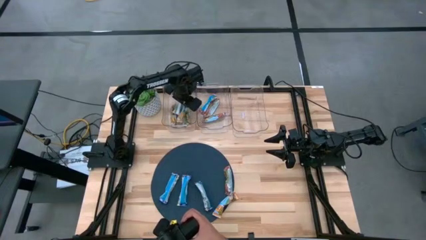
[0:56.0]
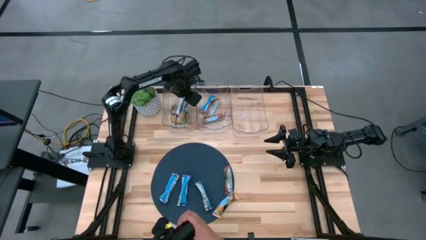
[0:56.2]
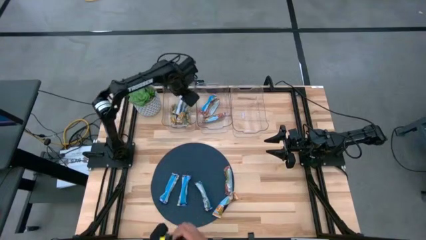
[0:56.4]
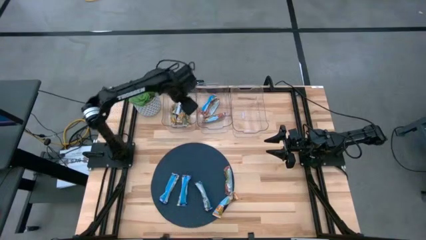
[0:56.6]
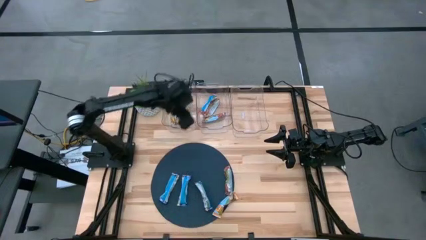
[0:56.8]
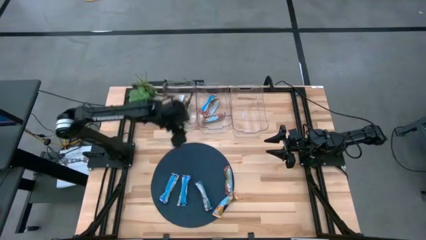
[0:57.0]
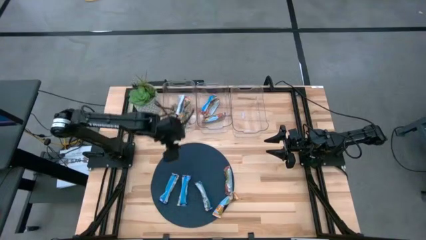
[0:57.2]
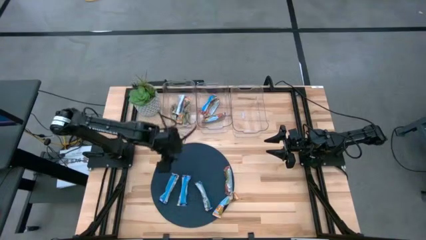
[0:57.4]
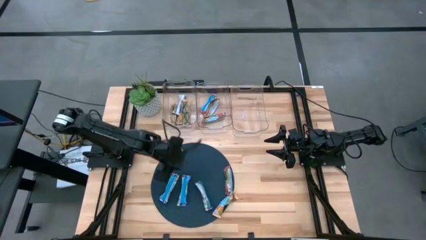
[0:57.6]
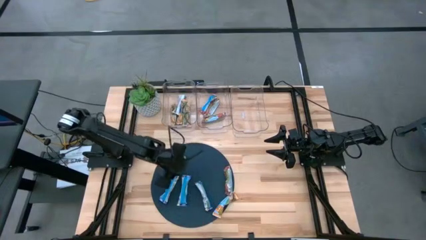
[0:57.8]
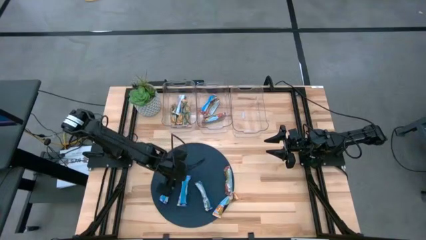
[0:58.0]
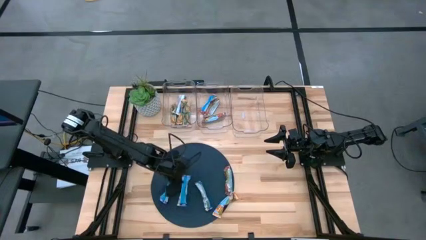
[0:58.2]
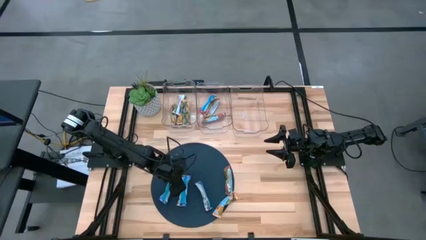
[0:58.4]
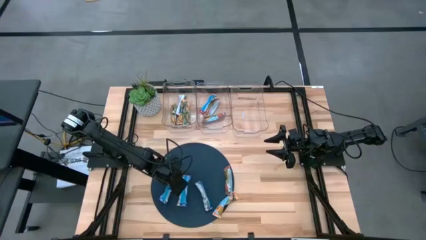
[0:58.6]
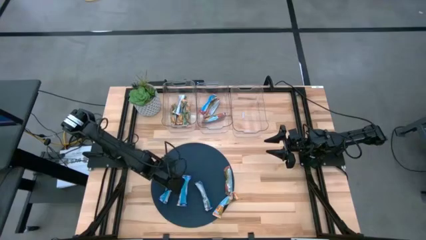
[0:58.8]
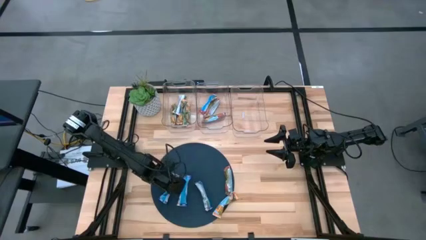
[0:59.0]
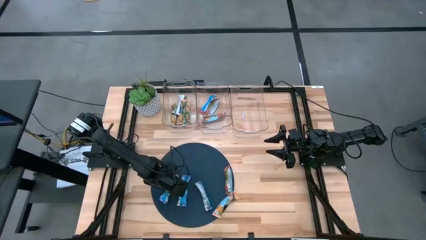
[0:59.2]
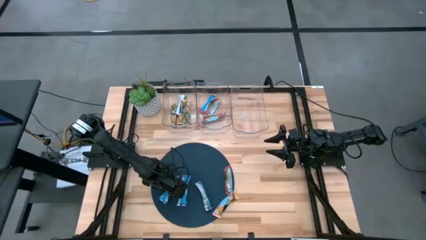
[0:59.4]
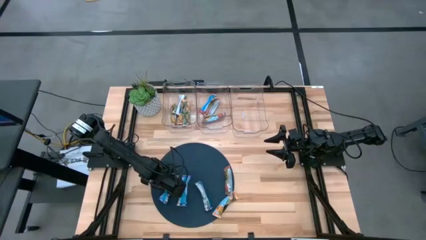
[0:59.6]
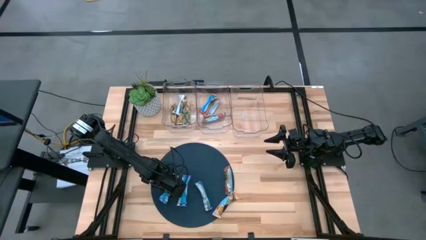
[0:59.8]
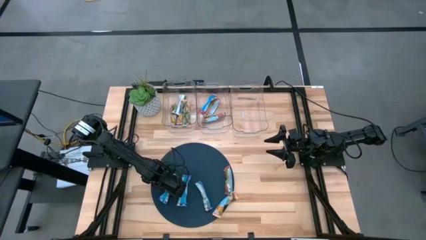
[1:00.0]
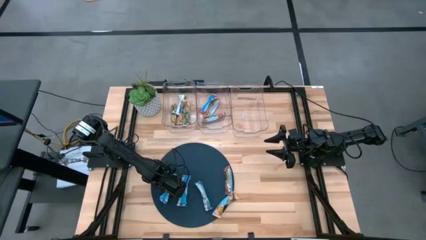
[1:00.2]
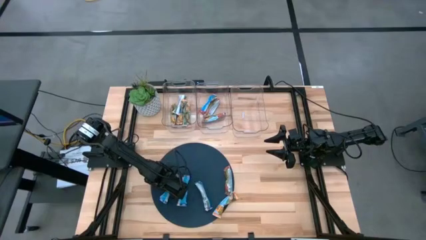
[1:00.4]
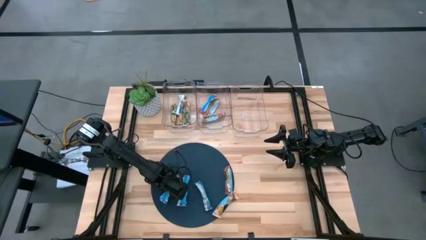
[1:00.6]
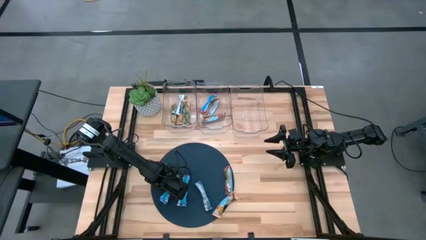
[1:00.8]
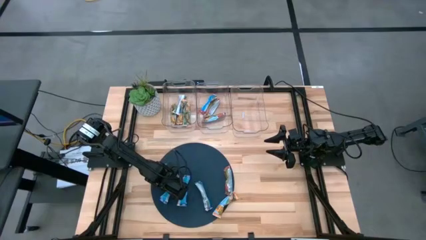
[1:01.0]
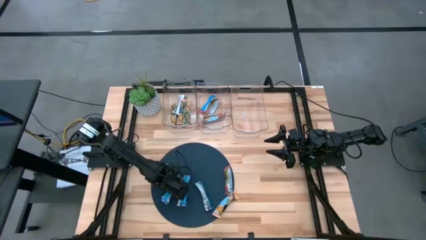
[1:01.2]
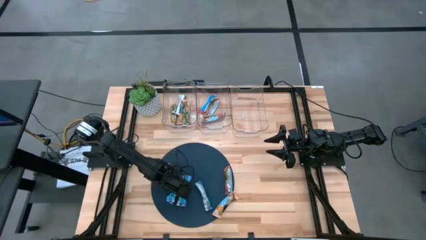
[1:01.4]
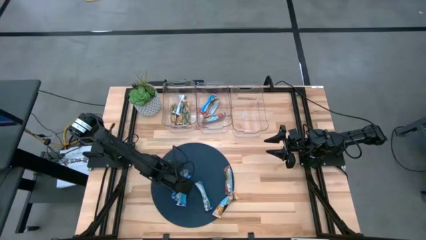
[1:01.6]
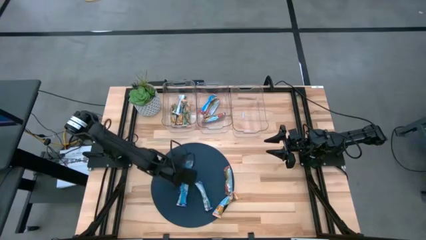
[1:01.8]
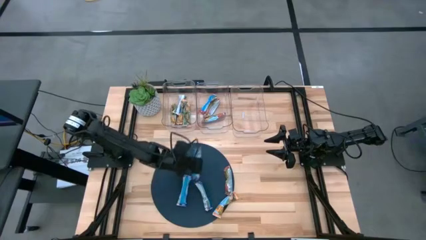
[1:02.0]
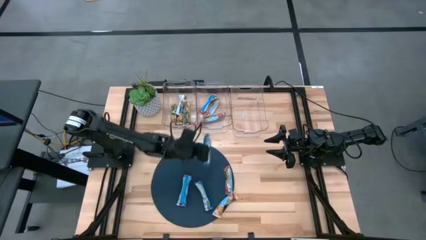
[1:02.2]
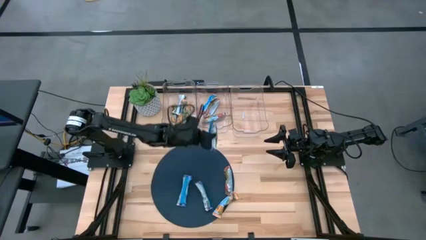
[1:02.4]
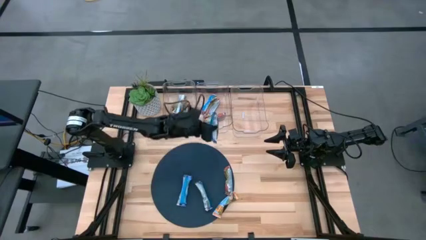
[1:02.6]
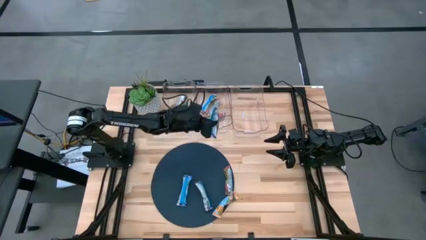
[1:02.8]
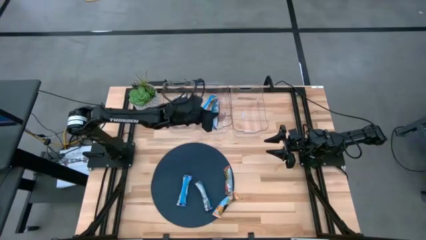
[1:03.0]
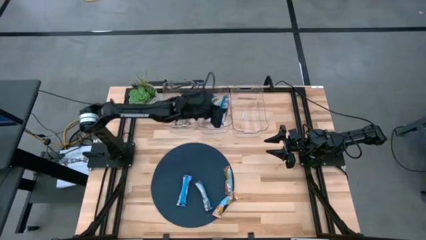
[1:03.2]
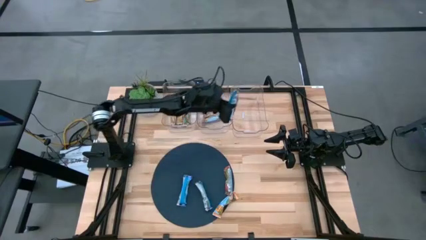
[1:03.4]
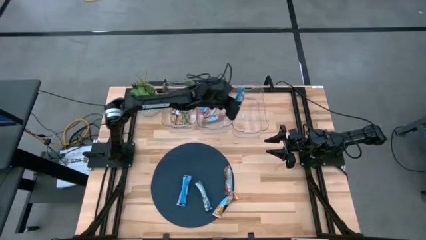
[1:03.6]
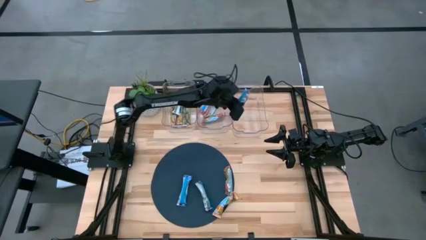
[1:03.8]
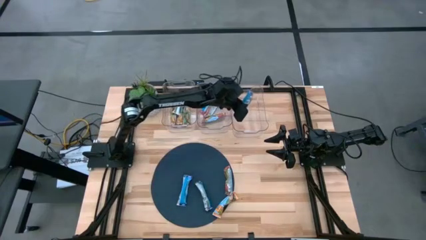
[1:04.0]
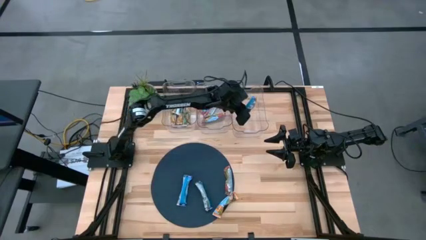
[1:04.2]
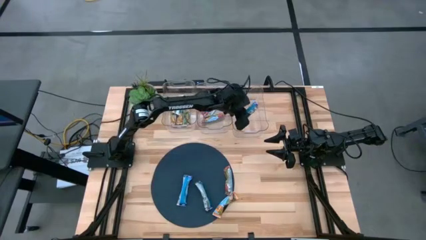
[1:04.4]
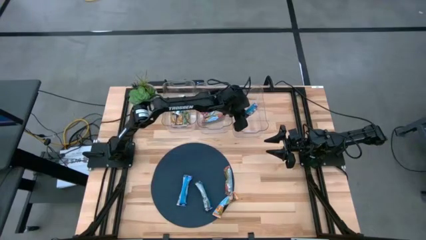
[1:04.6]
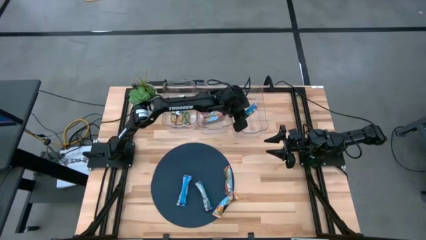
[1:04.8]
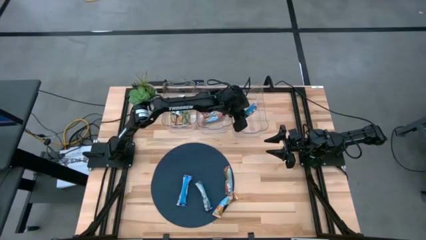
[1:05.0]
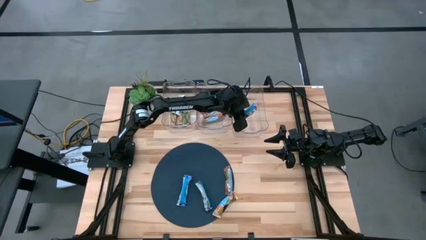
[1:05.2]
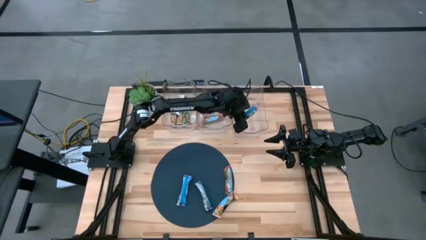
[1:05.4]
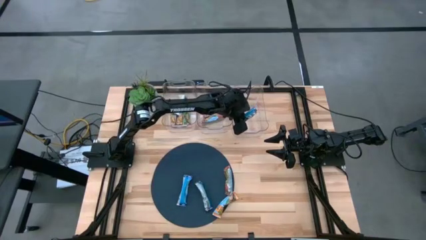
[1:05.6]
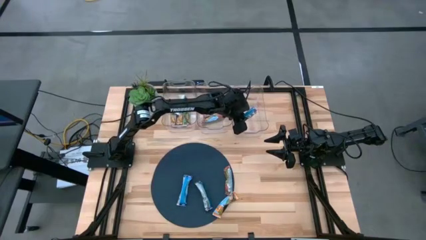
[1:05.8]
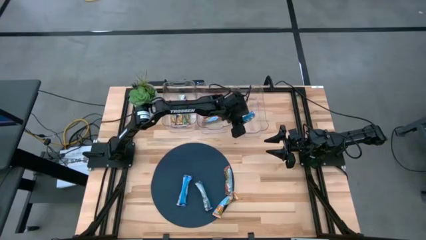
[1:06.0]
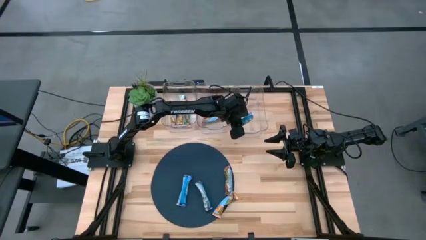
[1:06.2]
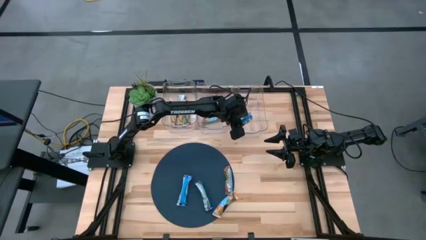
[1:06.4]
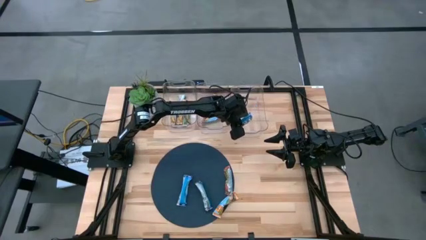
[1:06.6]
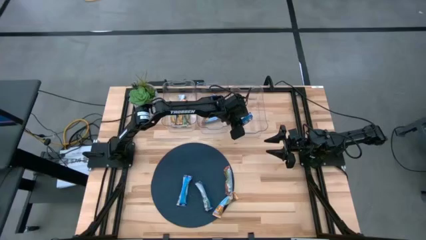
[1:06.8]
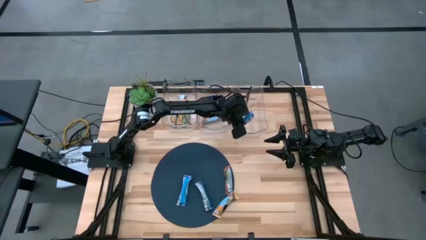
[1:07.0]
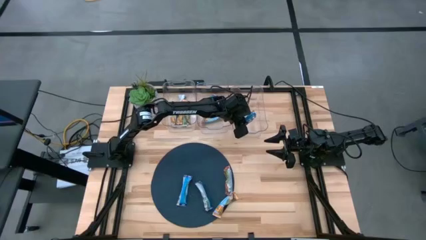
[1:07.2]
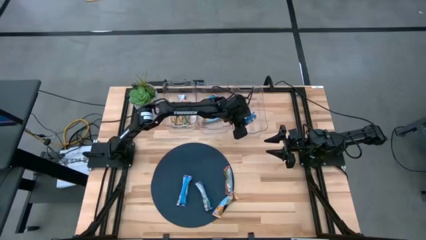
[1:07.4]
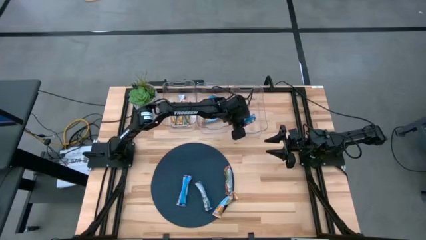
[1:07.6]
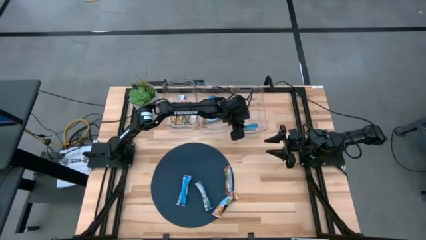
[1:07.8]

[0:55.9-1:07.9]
Task: Pick and place Granola Bars by type
Put the blue granola bar into the right transparent bin
